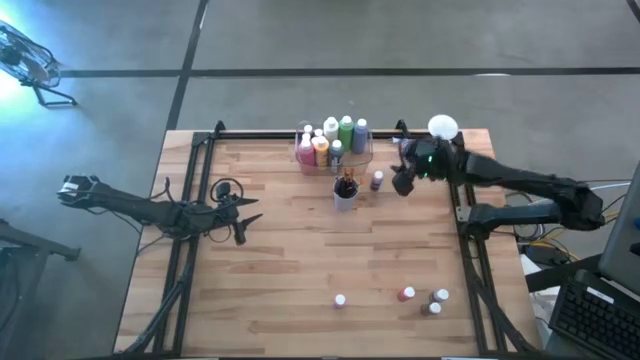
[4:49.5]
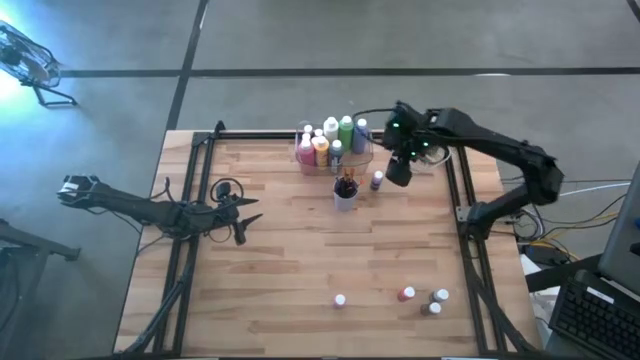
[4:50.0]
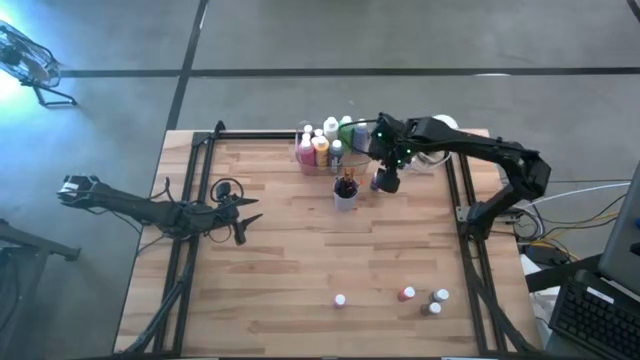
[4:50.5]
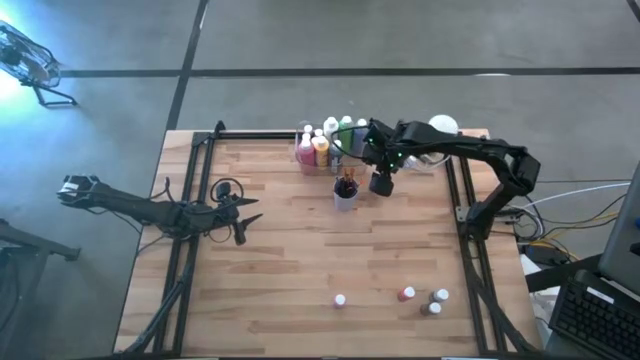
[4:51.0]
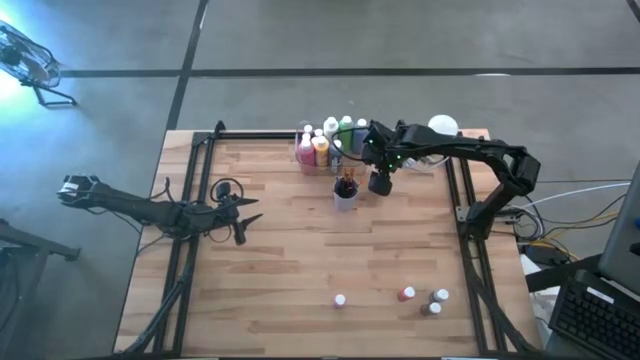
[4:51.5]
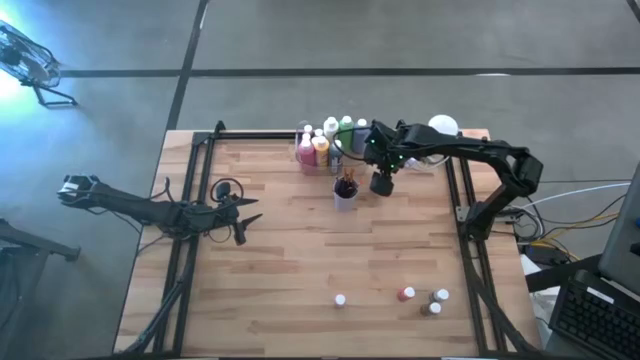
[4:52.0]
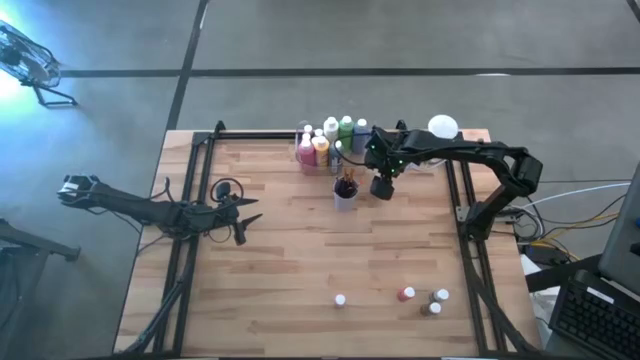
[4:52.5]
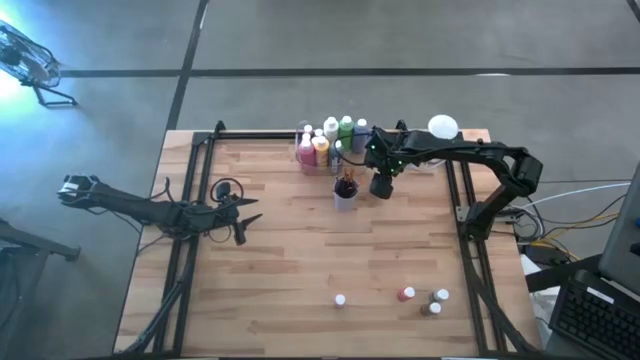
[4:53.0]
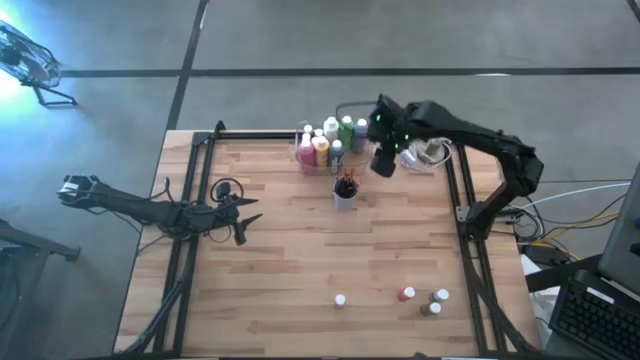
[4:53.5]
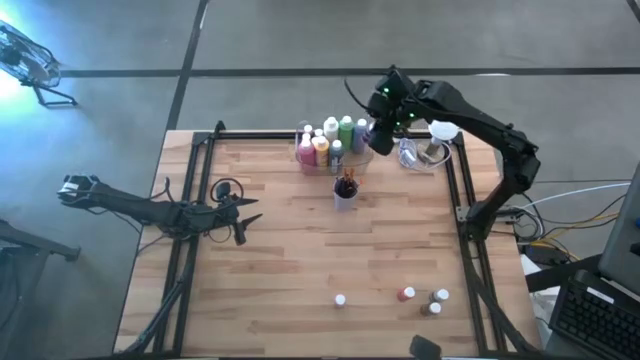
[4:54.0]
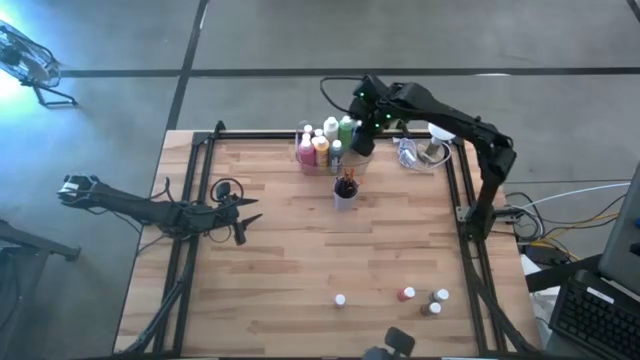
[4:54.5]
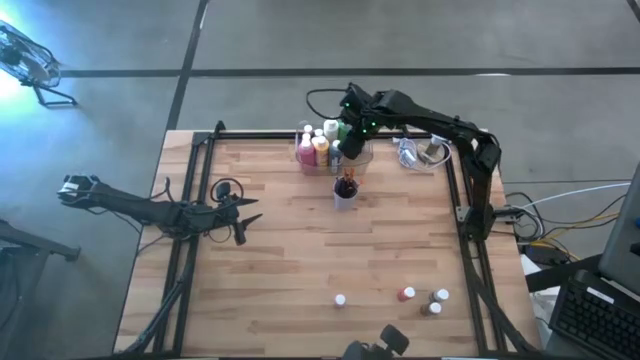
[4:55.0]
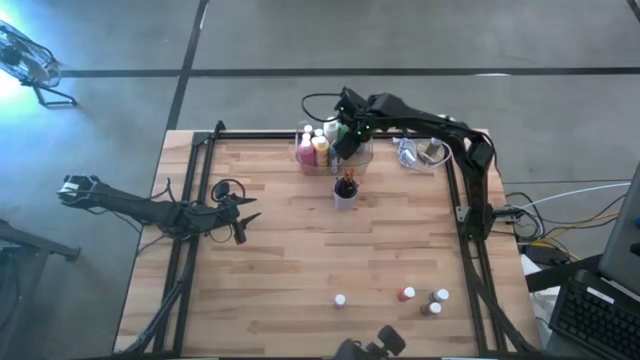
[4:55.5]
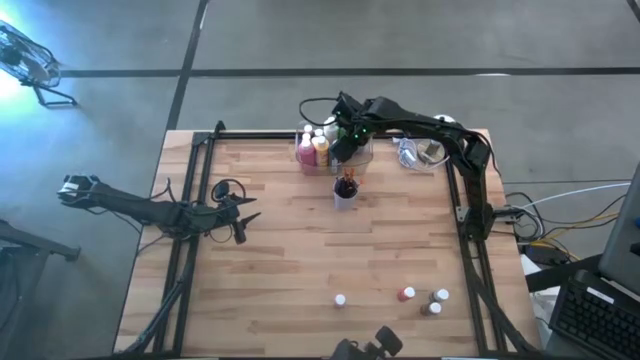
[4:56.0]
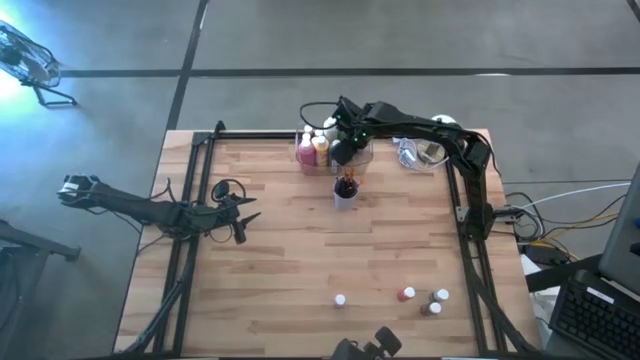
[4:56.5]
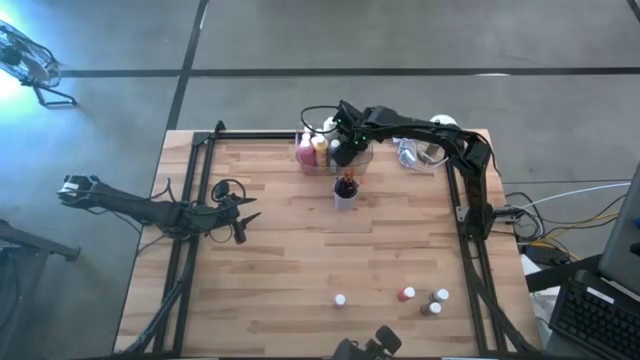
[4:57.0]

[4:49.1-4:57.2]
Task: Pick & Place Paint Supplies
Put the purple black paint bottle into the transparent bin

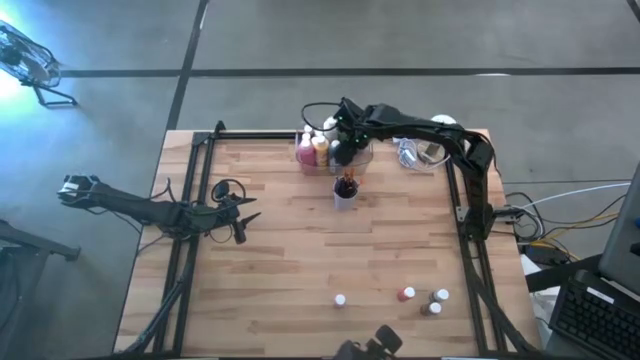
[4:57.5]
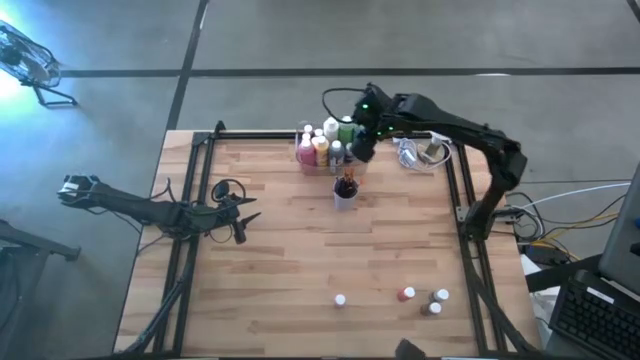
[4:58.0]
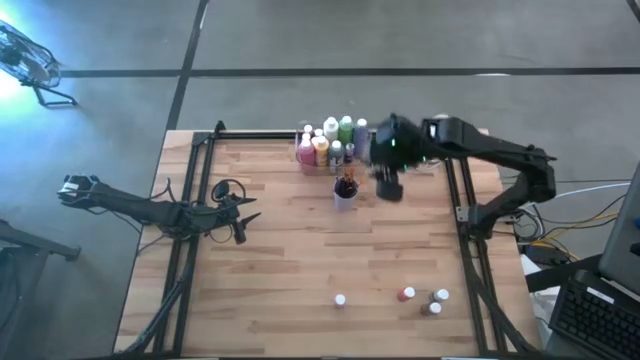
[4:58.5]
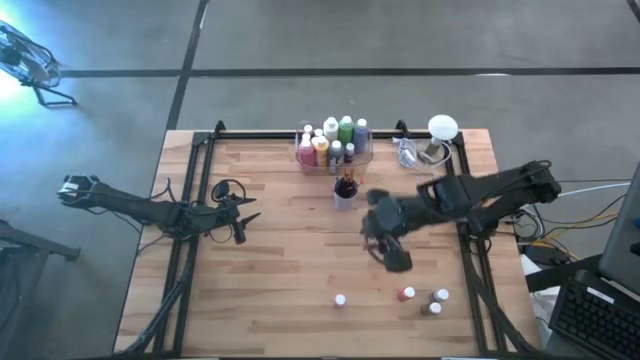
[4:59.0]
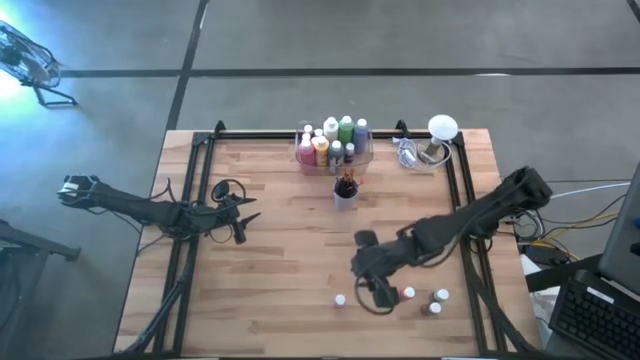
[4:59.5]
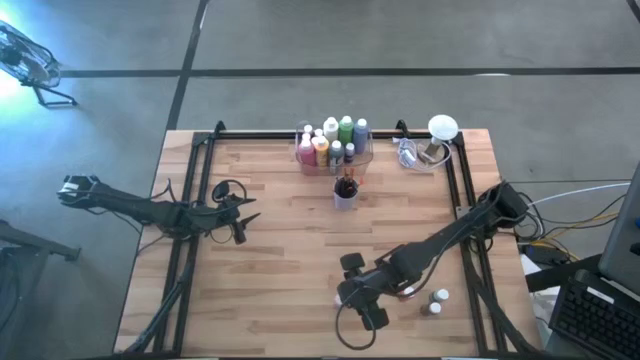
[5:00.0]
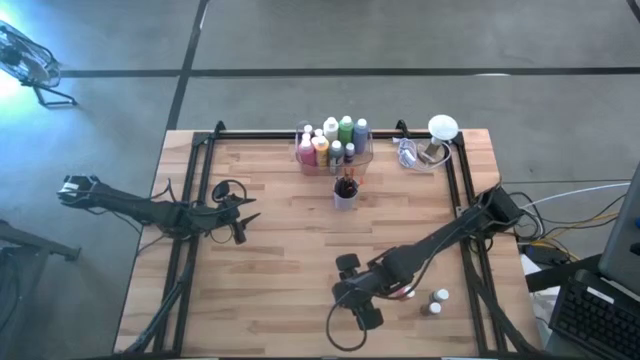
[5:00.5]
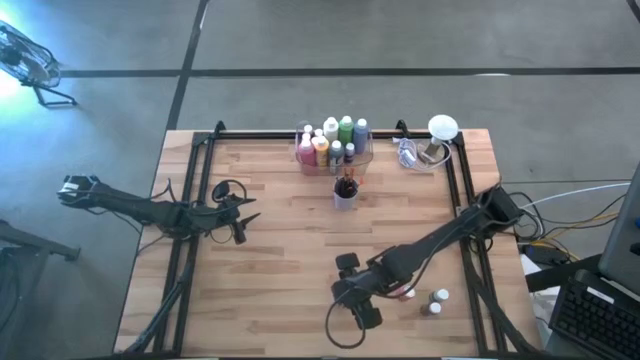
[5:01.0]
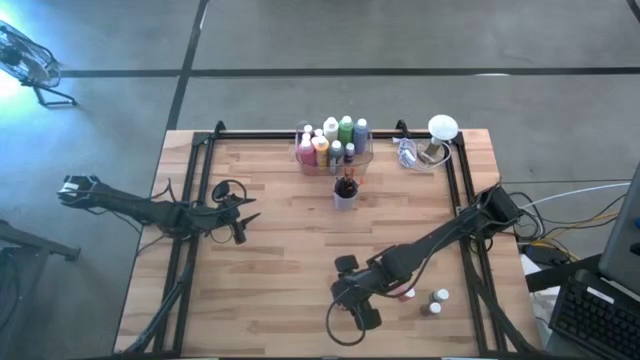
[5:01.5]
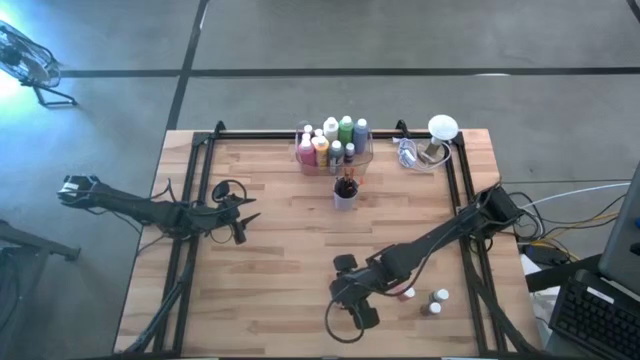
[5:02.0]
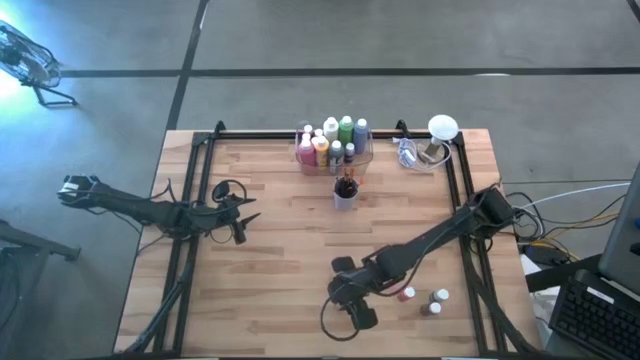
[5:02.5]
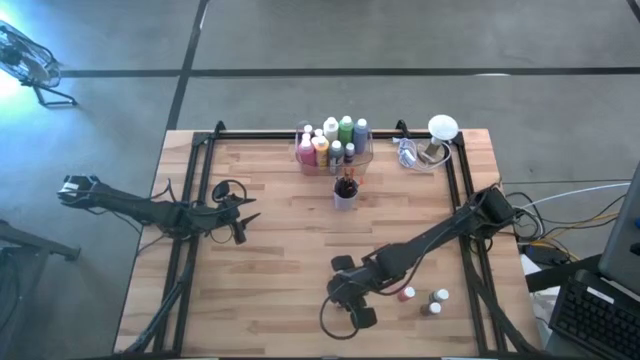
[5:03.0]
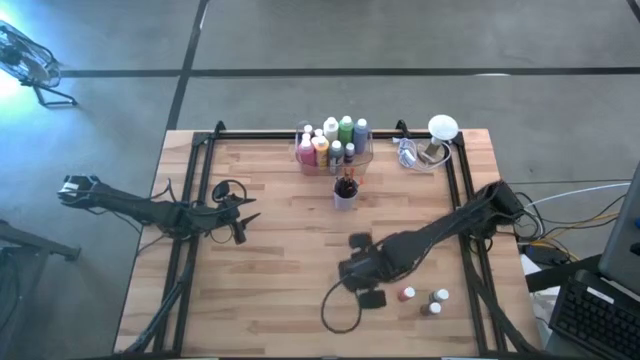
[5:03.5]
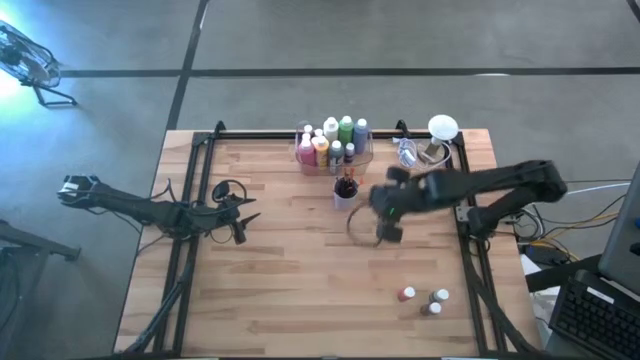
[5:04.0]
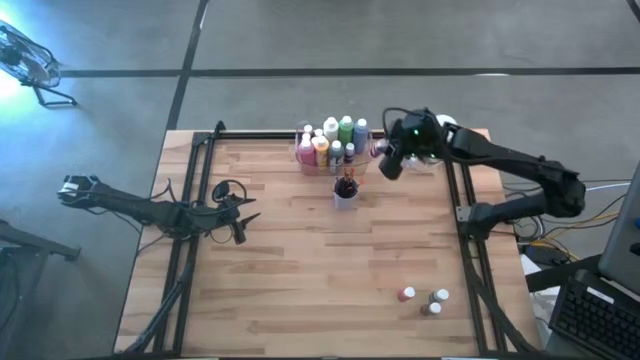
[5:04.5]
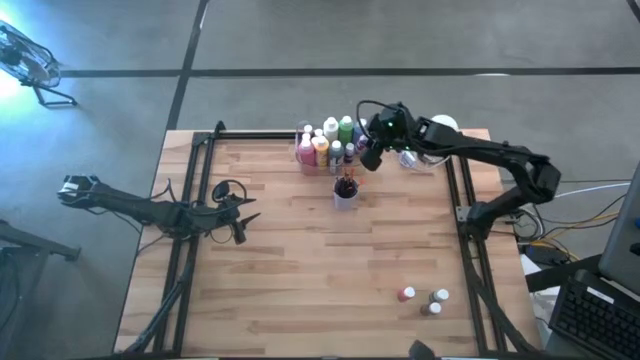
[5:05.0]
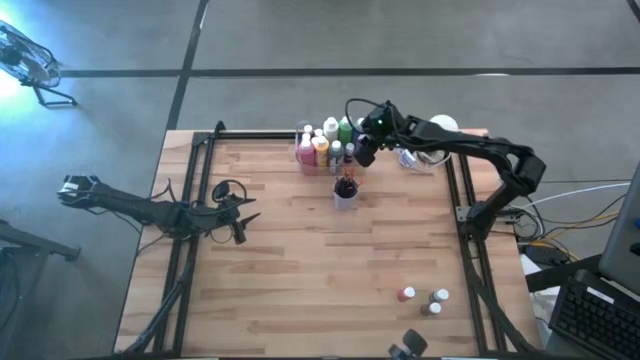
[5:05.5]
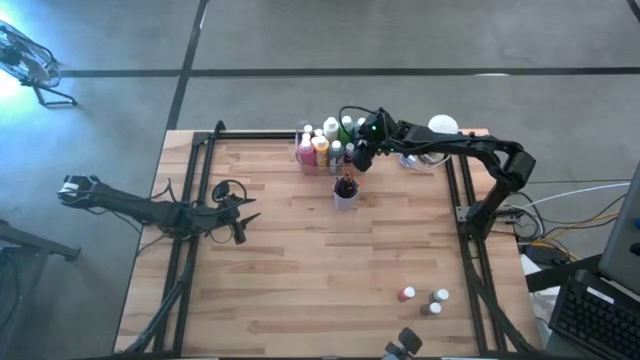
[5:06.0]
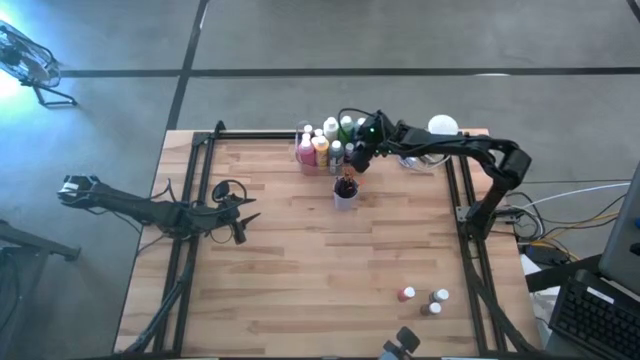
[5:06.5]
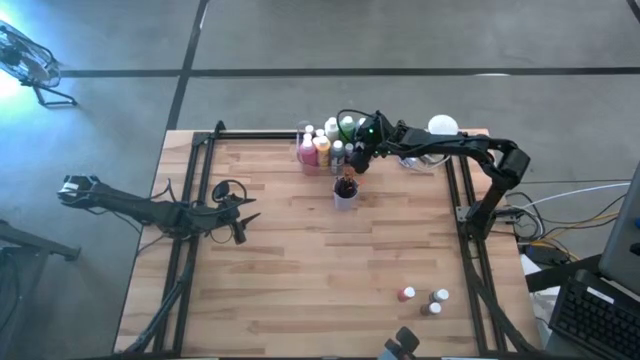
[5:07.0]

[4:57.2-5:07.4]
Put the pink black paint bottle into the transparent bin

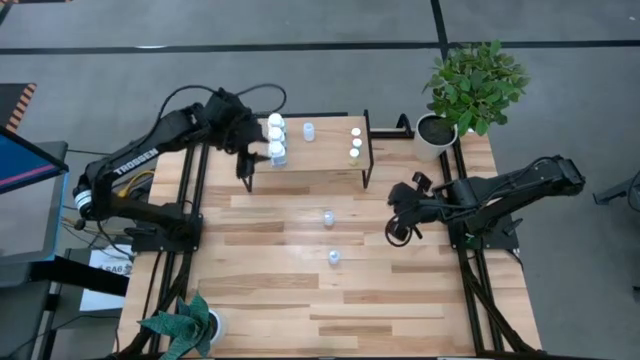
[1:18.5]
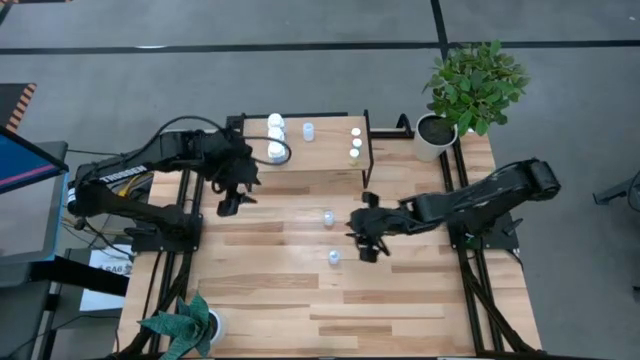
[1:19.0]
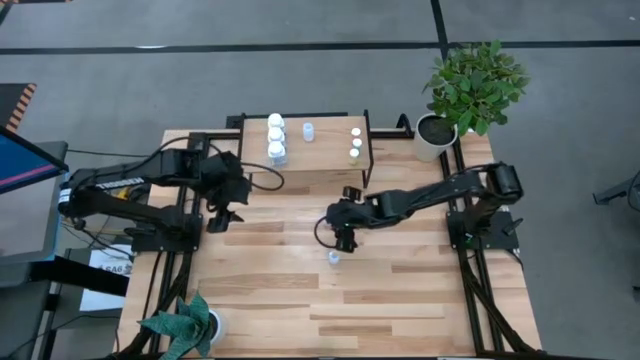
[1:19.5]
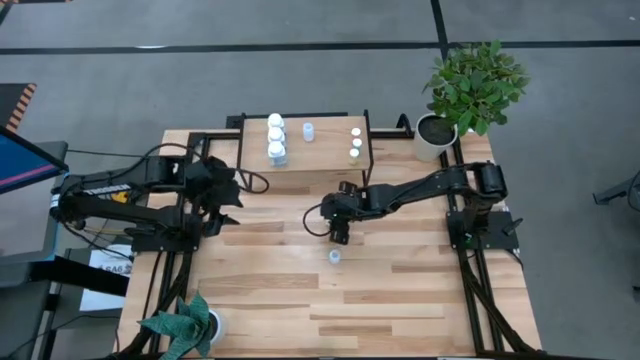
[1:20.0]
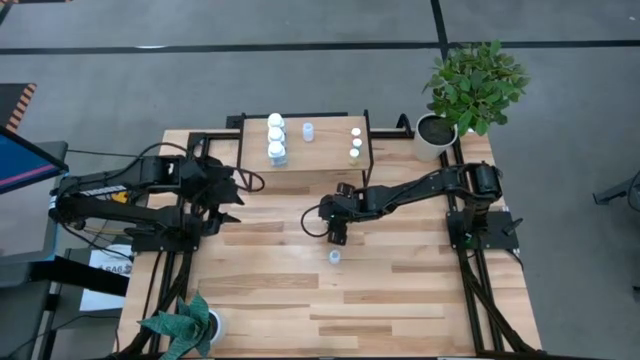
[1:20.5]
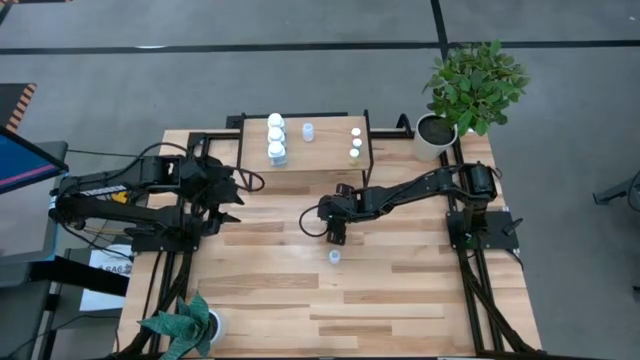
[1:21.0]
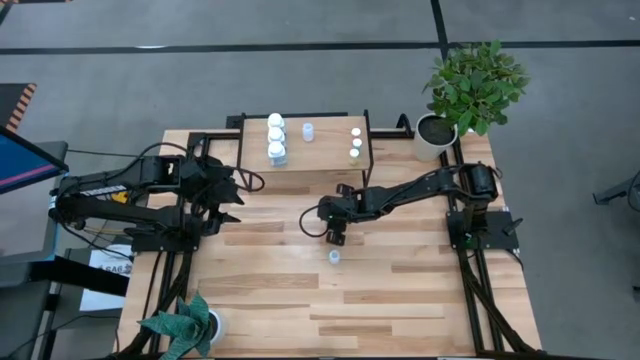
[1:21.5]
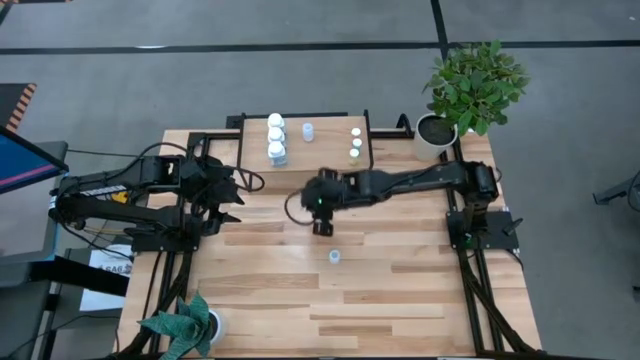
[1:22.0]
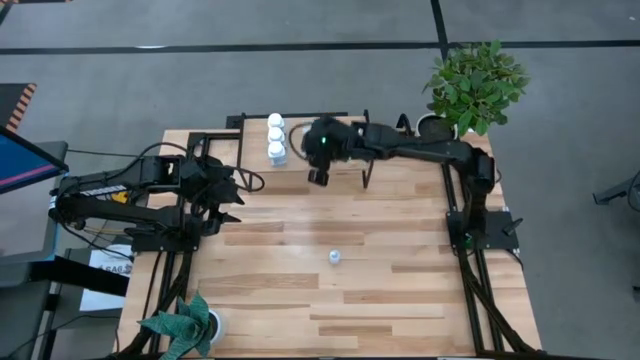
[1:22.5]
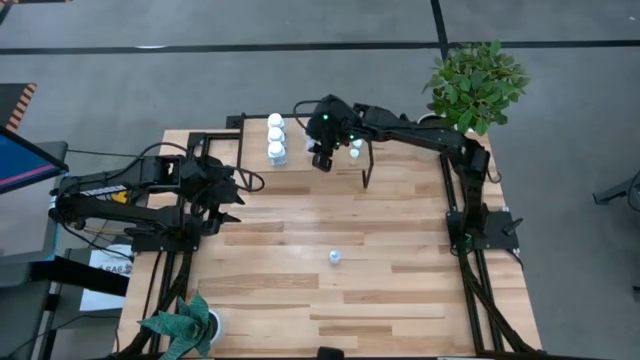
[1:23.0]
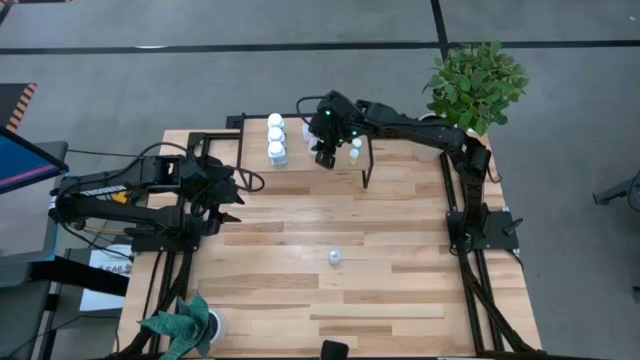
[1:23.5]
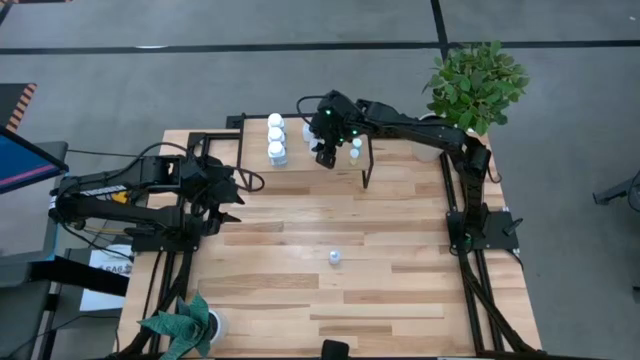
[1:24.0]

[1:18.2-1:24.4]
Task: Pick and place medicine bottles onto shelf by color
Put the top transparent pill bottle on the shelf aligned with the other transparent pill bottle
